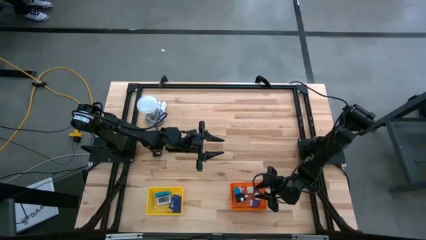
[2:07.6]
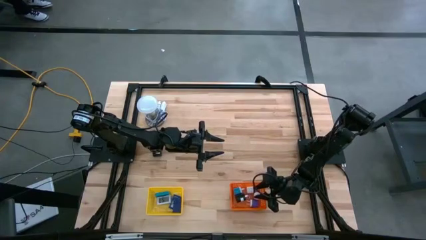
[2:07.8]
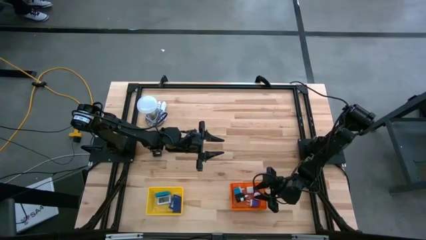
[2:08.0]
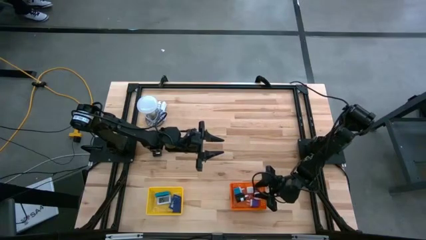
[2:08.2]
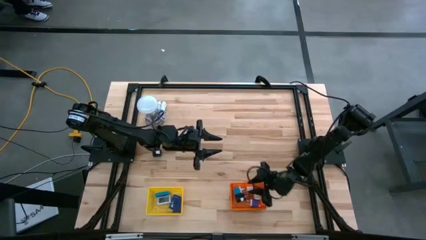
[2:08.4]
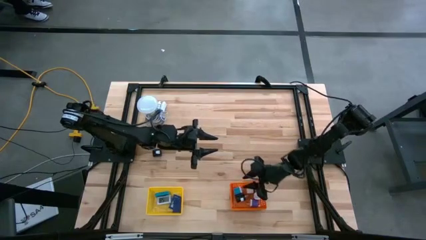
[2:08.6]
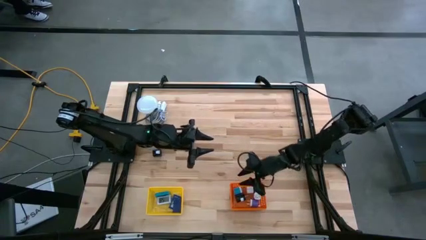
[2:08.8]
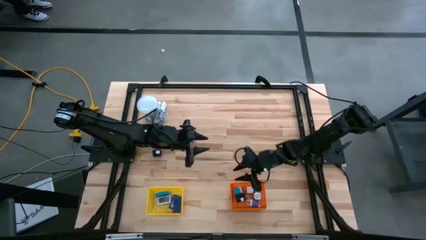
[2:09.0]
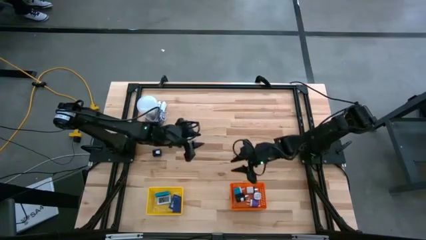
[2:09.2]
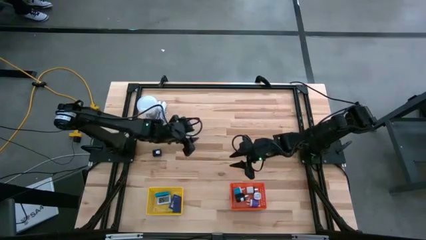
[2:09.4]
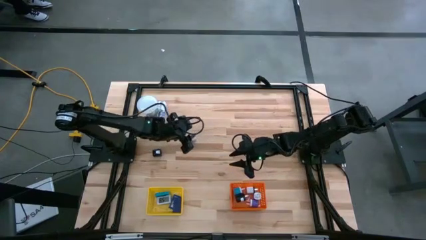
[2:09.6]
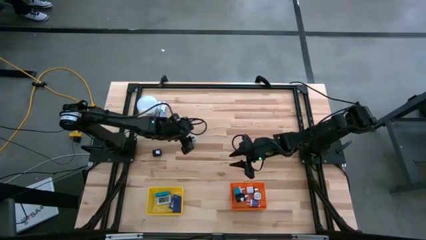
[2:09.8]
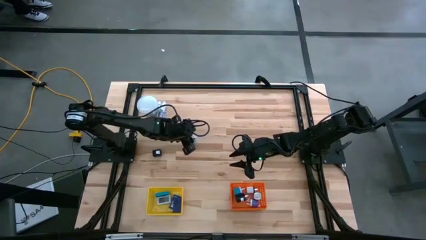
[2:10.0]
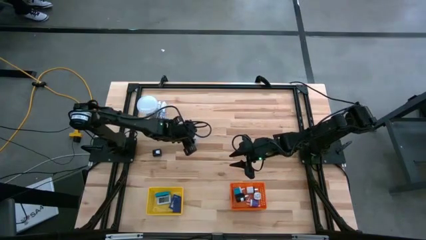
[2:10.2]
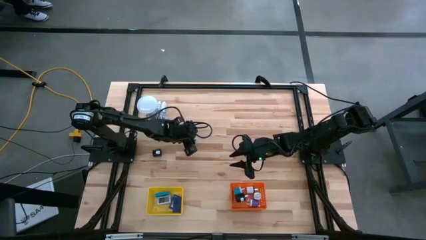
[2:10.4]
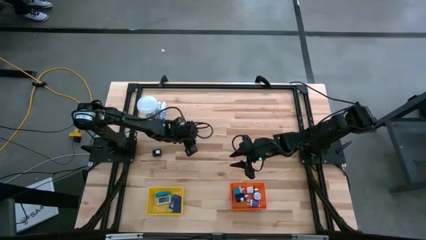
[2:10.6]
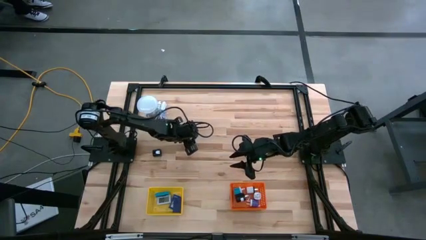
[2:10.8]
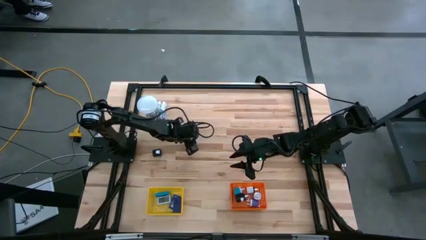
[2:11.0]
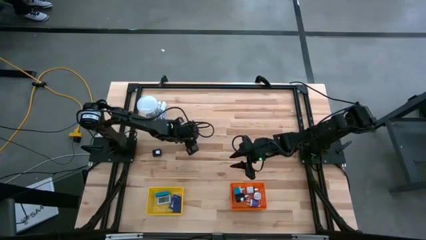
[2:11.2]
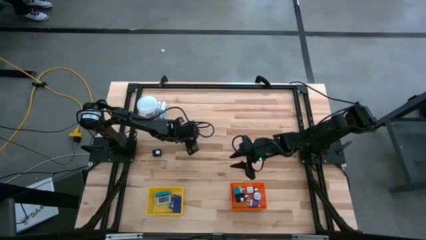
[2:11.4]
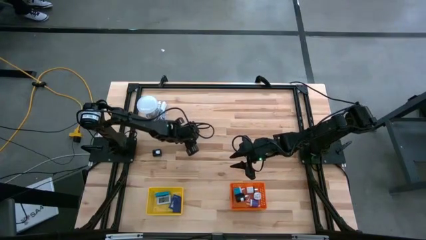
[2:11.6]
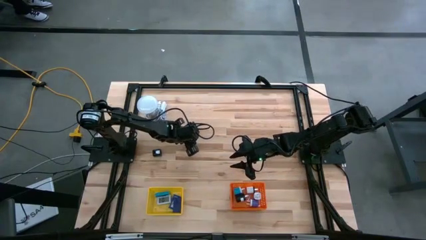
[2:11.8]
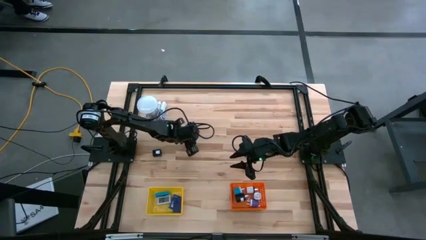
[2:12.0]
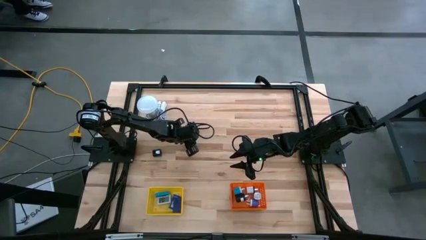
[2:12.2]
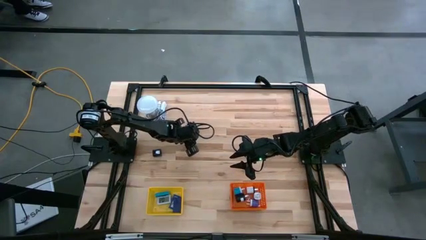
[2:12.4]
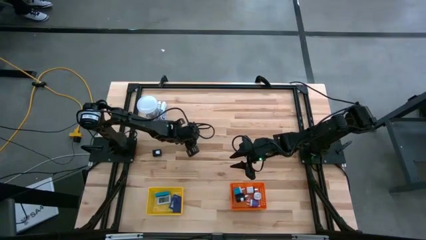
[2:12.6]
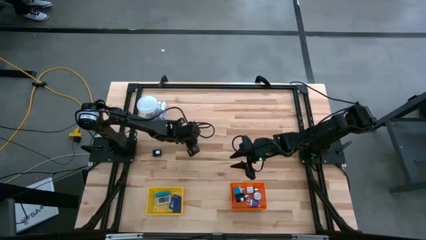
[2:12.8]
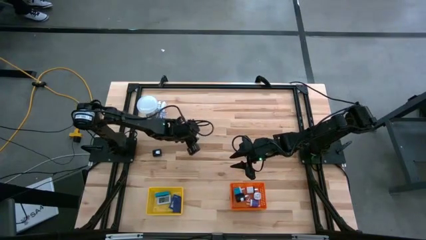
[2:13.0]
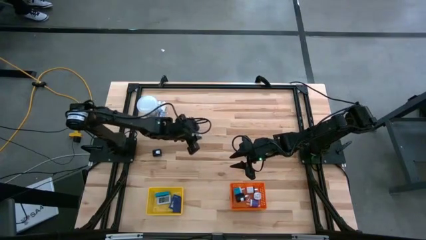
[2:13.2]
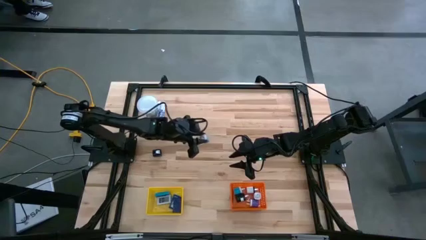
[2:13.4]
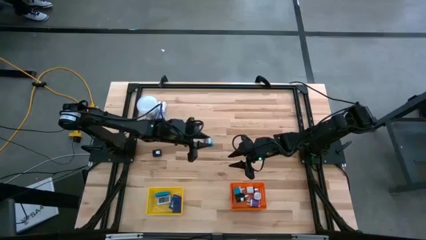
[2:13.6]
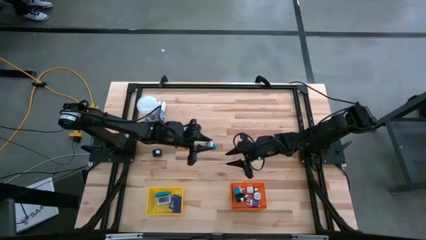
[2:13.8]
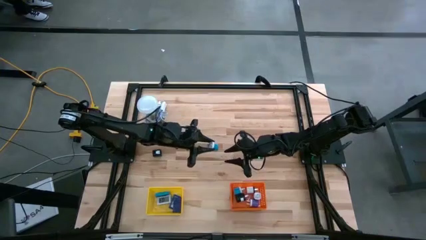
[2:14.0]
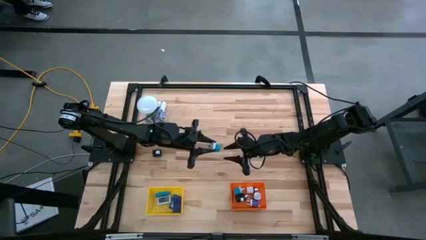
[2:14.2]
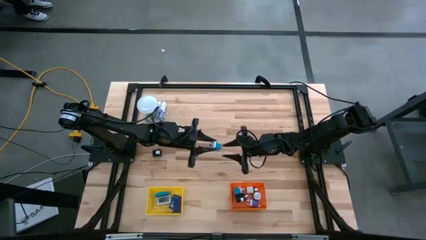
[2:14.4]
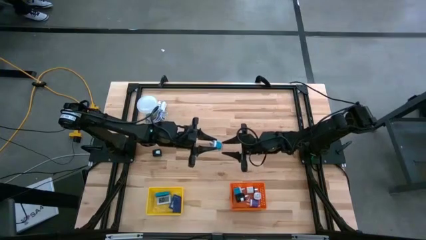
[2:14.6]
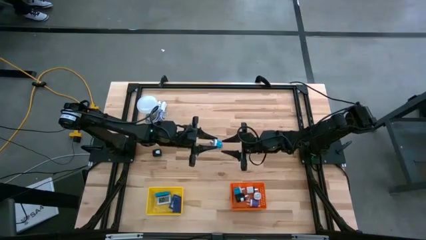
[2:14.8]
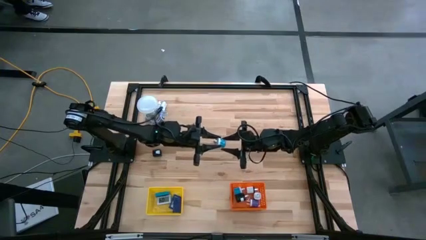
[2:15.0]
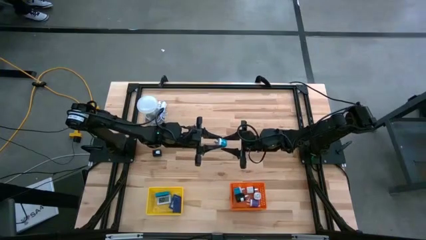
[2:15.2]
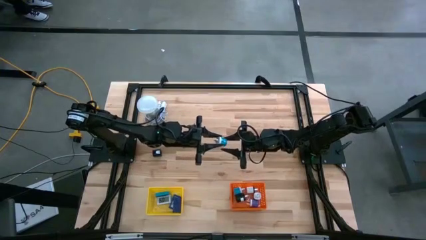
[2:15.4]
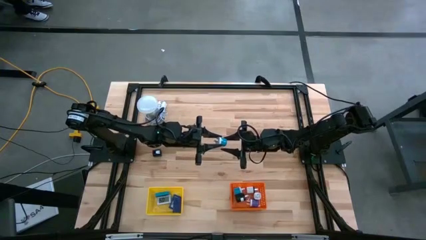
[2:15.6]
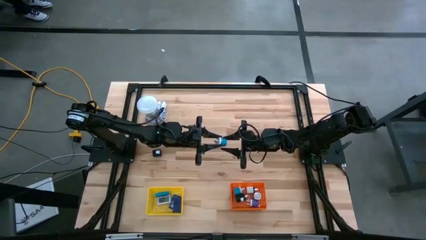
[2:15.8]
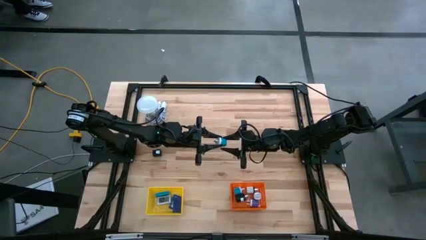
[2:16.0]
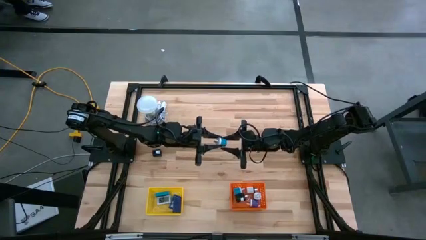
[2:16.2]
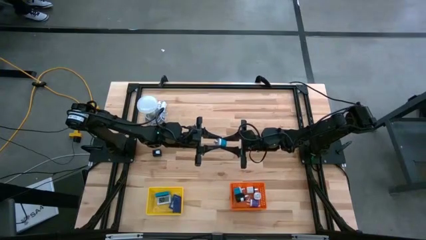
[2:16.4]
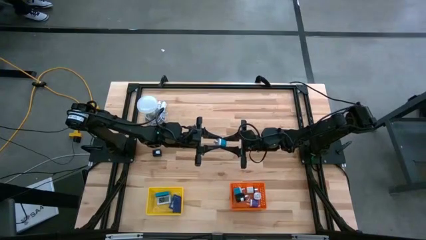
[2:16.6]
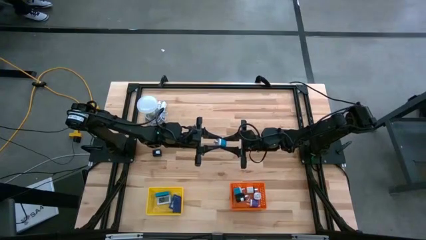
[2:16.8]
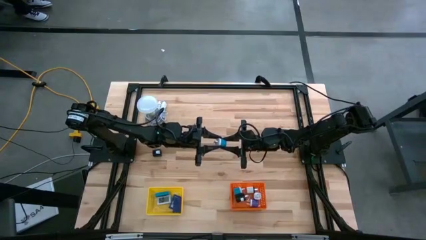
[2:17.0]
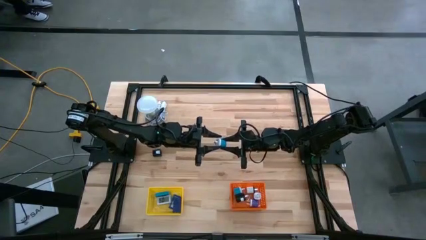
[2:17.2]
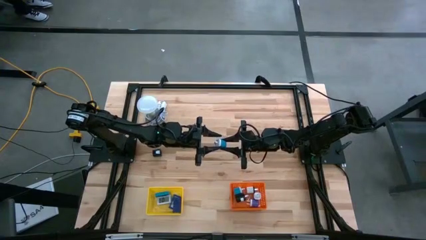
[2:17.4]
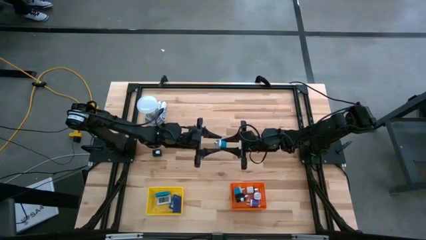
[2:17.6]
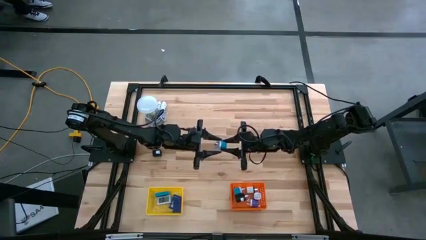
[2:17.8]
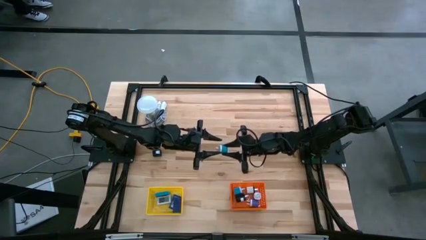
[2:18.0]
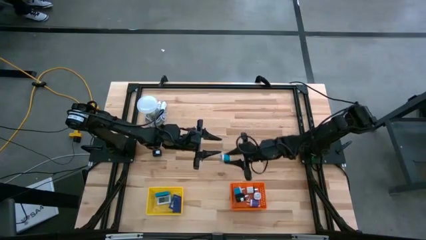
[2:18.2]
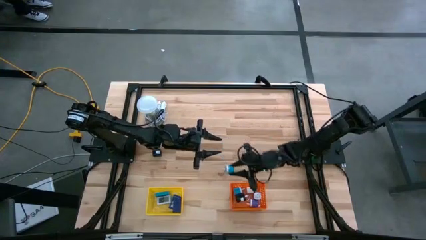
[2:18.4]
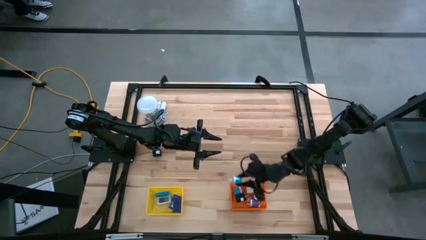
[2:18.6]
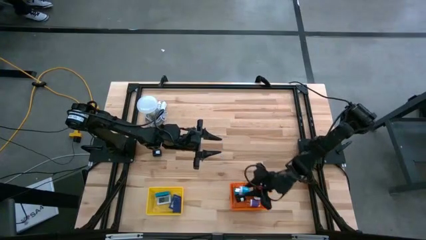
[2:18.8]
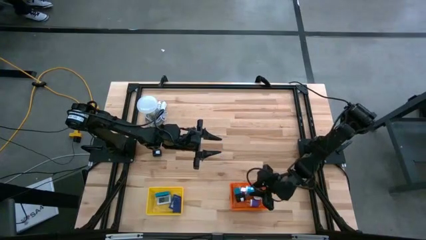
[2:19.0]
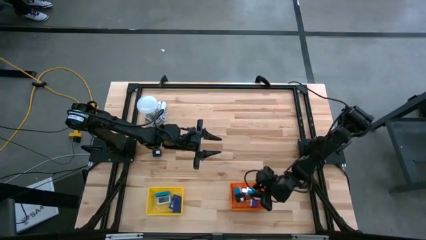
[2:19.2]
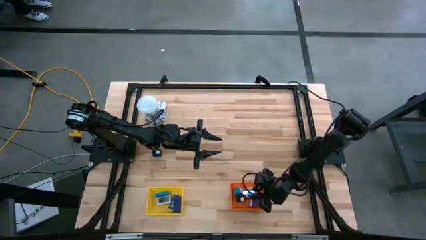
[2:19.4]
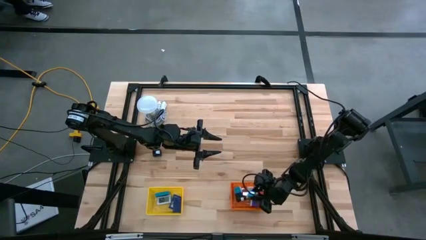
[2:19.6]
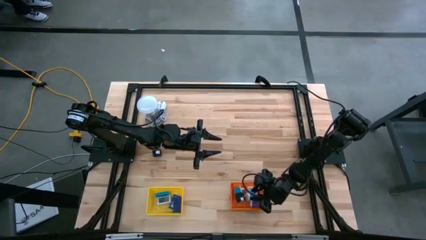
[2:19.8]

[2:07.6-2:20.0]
Task: Pick & Place Office items
Put the light blue charger adapter into the orange bin
